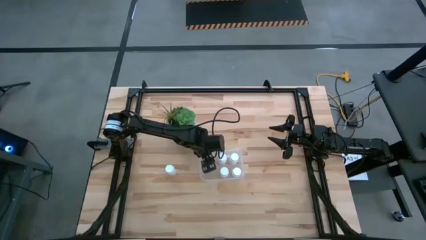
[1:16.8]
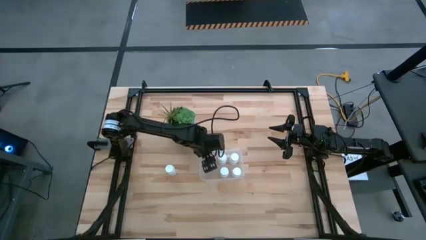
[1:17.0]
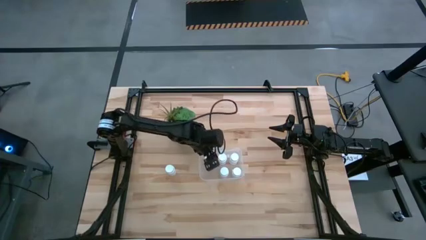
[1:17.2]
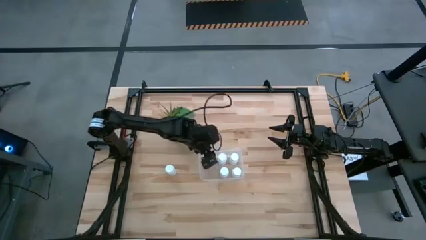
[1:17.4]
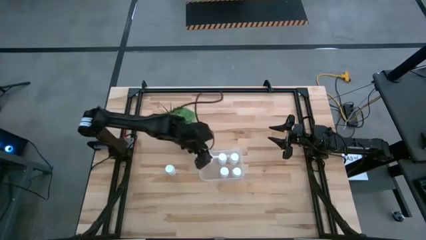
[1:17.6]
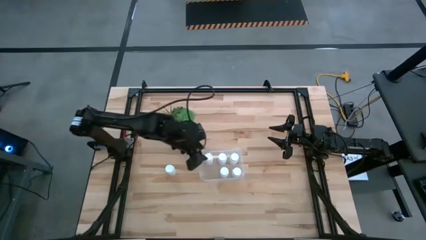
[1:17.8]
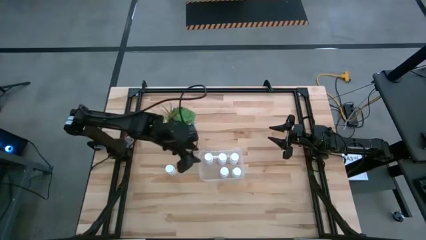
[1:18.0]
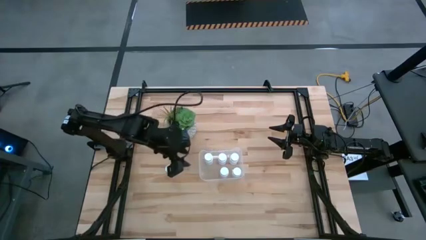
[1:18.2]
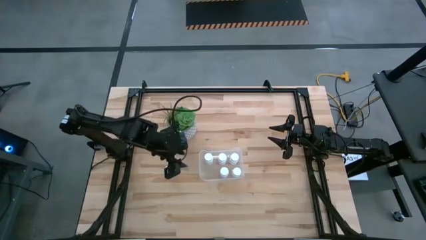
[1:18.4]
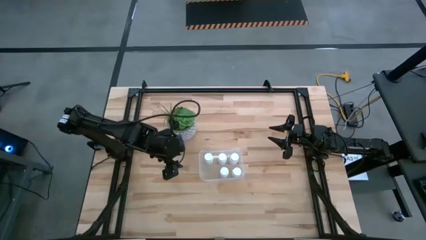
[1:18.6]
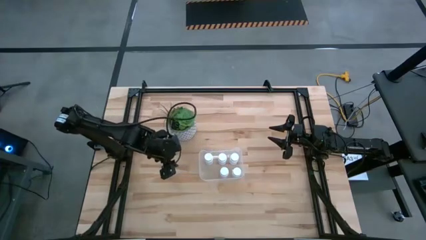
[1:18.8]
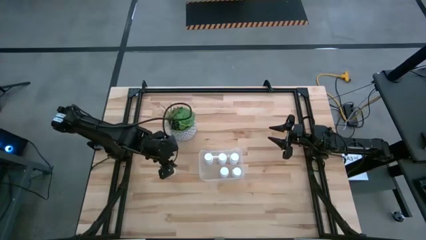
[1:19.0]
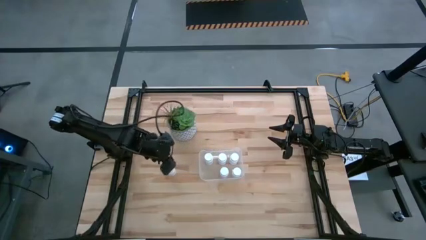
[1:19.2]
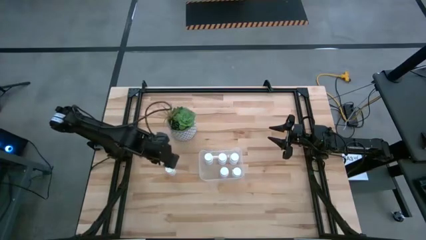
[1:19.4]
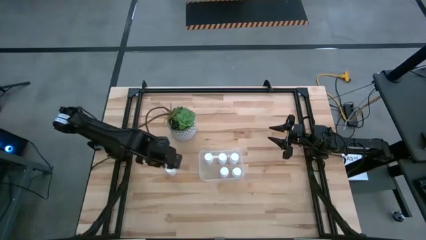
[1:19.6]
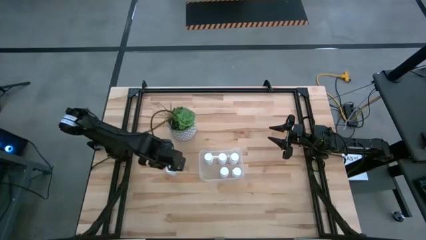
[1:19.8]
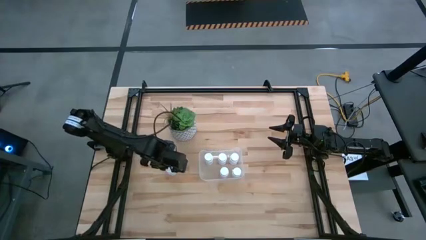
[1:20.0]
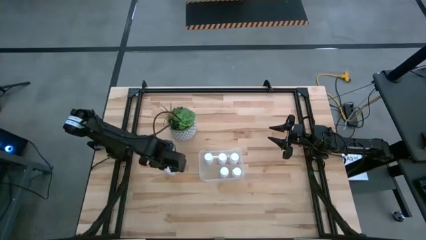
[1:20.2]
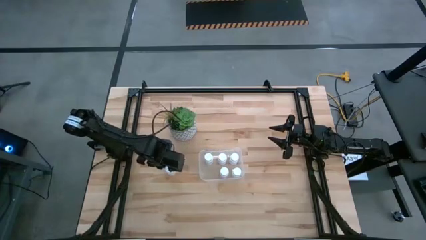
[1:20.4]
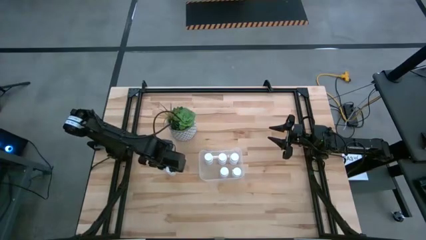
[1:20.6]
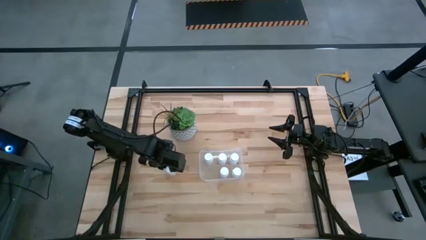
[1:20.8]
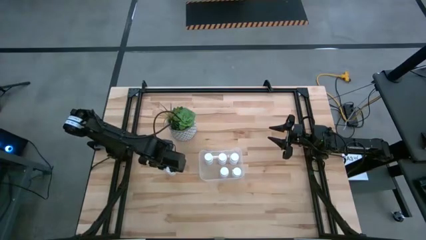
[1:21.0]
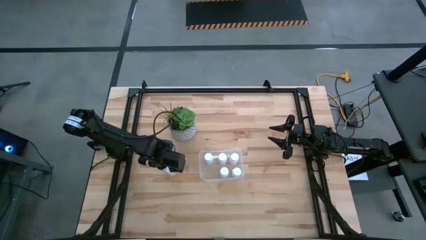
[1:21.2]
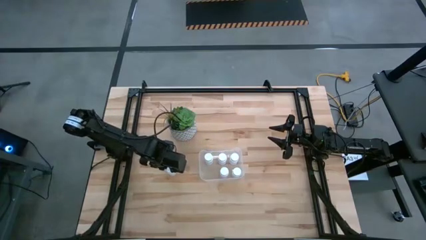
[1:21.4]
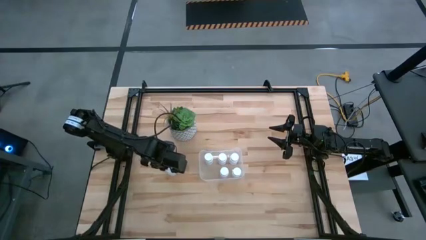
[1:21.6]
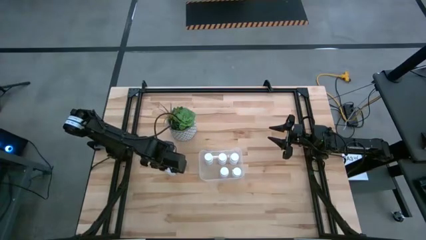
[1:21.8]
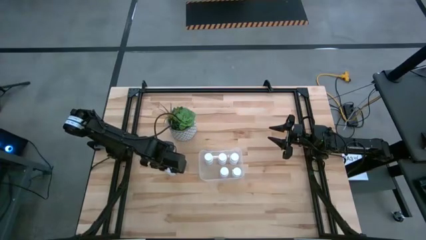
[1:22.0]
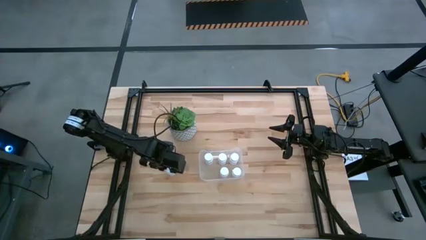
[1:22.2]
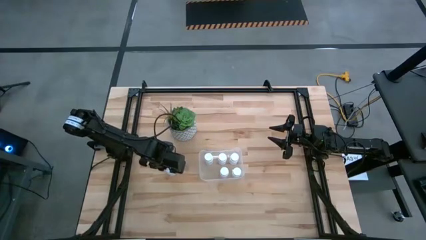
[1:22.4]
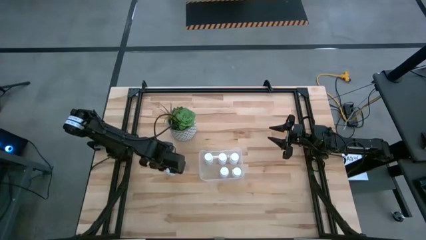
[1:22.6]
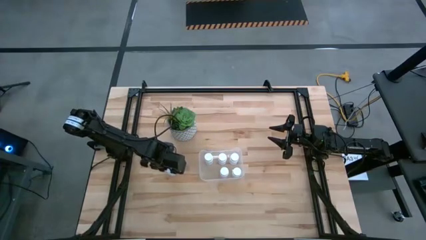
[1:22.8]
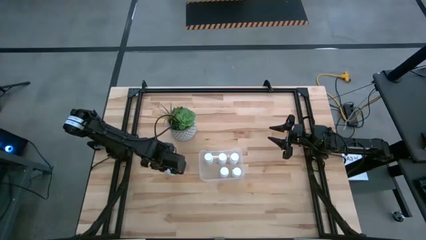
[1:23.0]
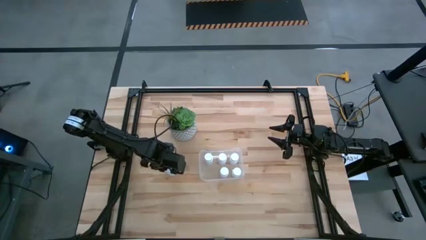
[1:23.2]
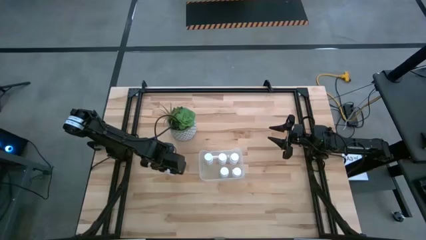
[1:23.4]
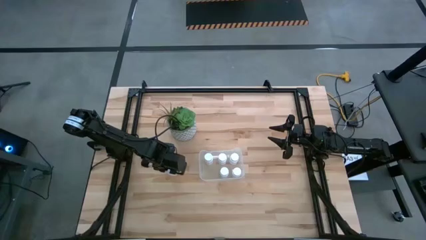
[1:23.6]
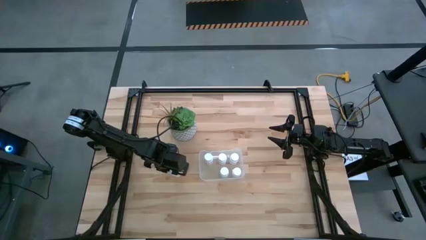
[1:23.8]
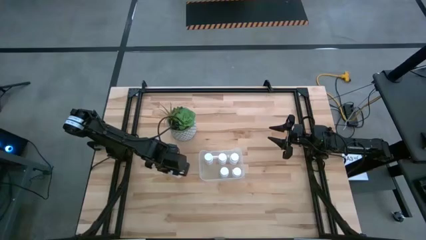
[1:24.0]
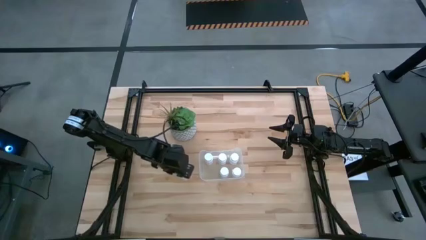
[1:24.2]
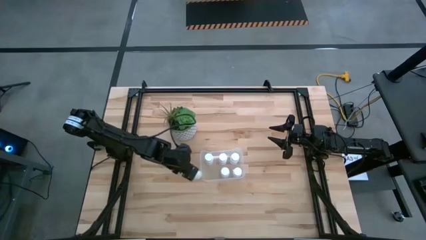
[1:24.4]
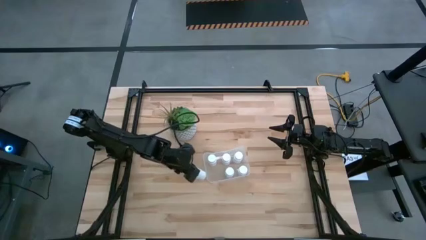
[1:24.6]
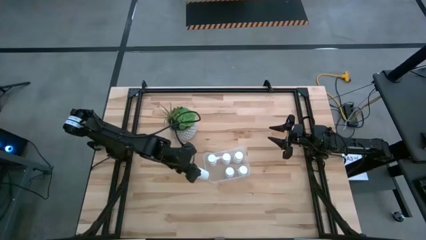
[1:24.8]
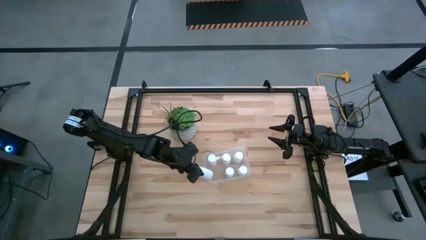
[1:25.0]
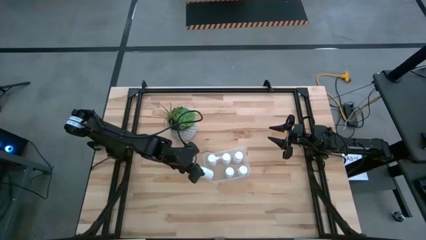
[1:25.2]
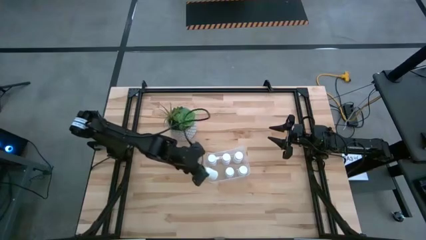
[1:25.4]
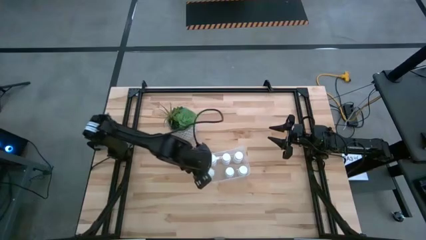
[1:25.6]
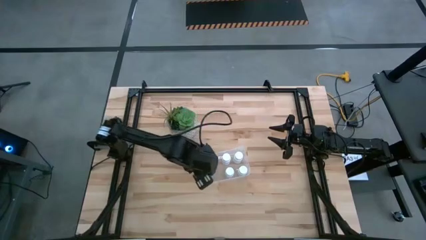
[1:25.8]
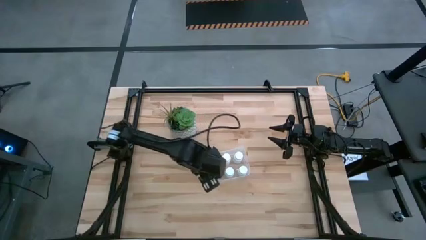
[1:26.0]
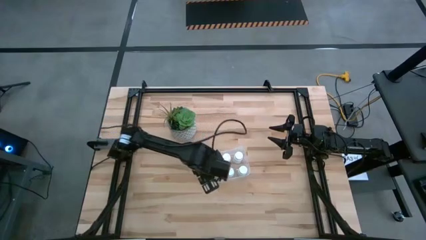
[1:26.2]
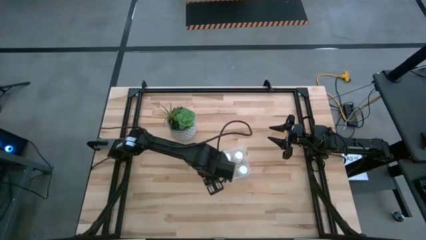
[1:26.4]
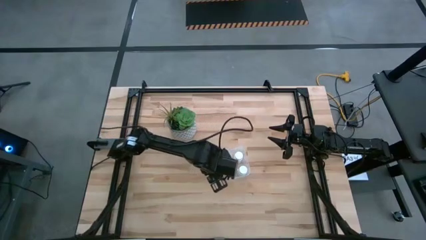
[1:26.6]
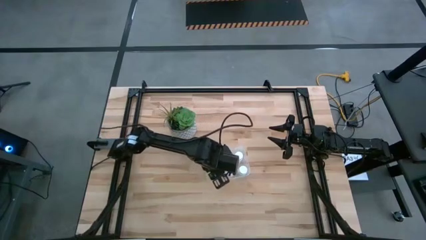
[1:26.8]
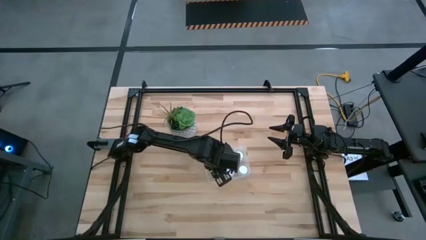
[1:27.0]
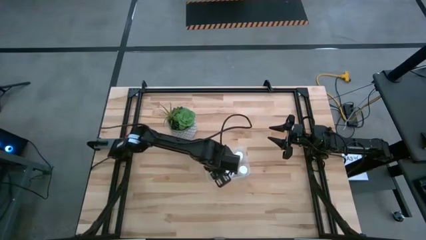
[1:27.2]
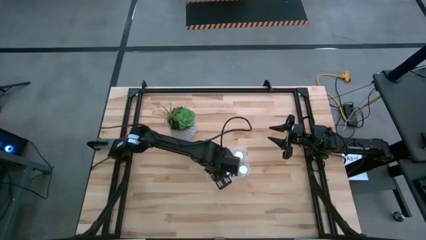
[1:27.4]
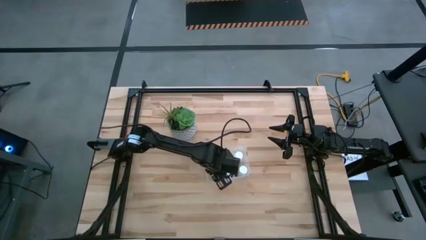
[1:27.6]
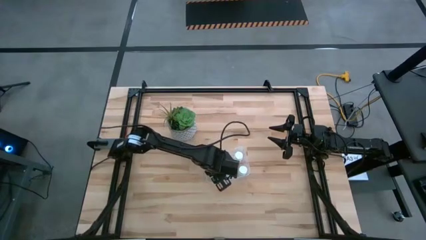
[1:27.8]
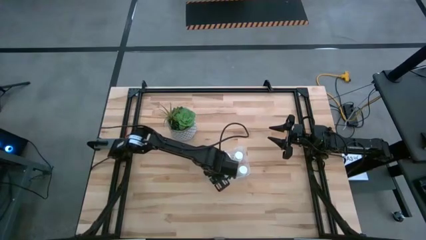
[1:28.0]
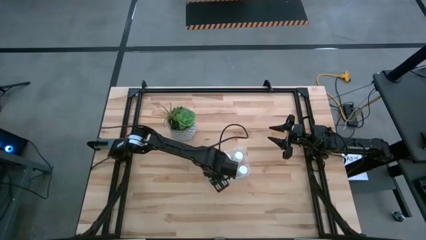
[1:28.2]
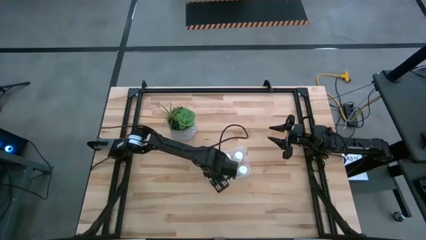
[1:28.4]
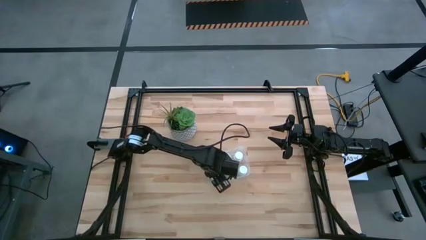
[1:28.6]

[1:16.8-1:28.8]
Task: Pick and place pill bottles into a basket
Put the white pill bottle into the transparent bin
